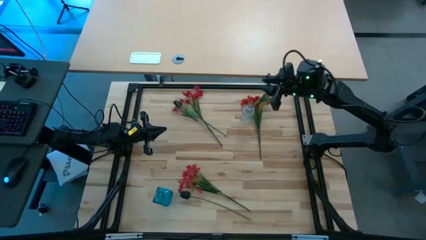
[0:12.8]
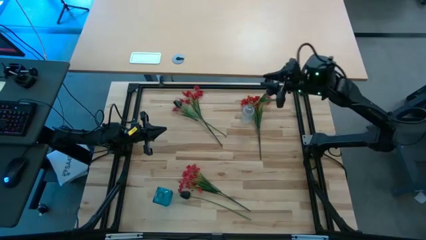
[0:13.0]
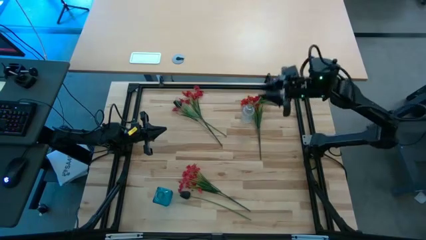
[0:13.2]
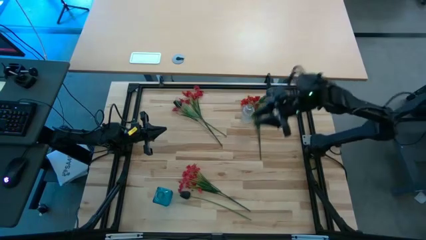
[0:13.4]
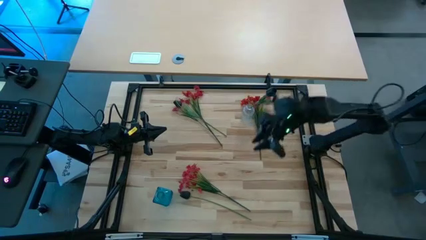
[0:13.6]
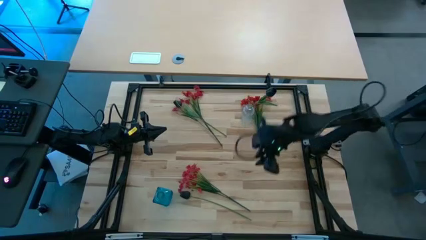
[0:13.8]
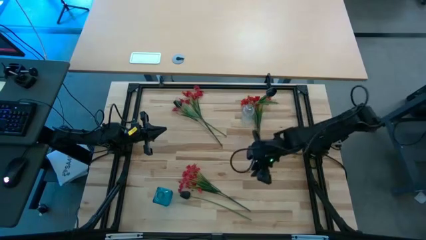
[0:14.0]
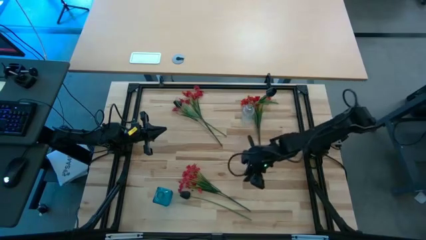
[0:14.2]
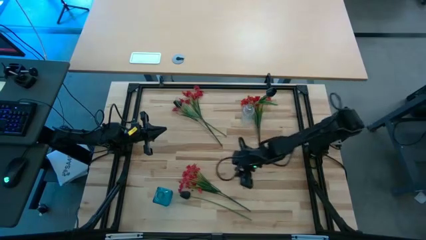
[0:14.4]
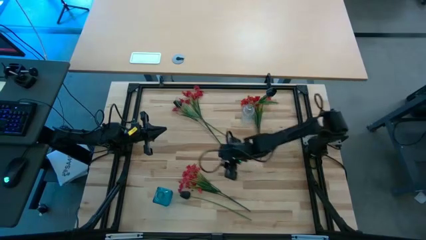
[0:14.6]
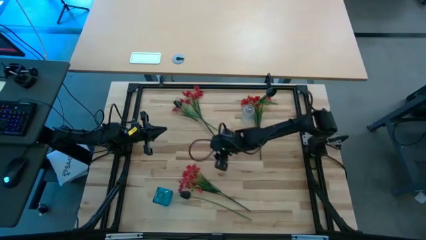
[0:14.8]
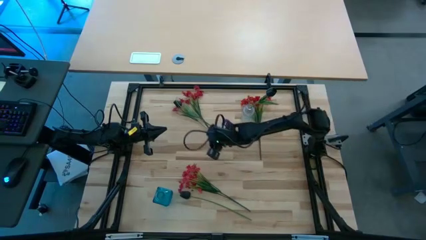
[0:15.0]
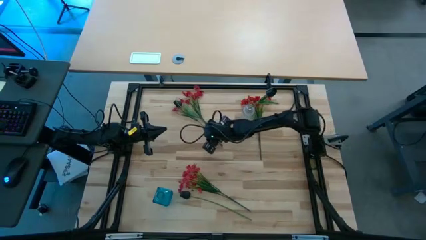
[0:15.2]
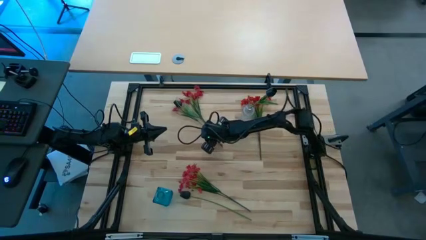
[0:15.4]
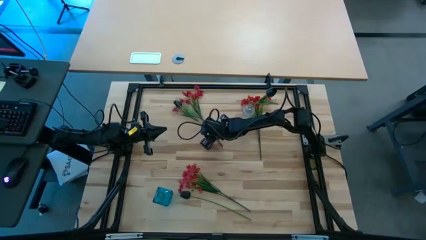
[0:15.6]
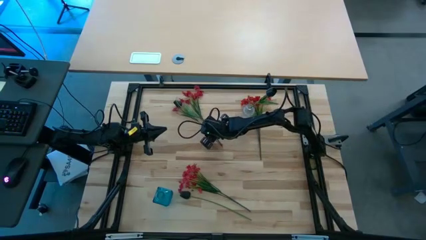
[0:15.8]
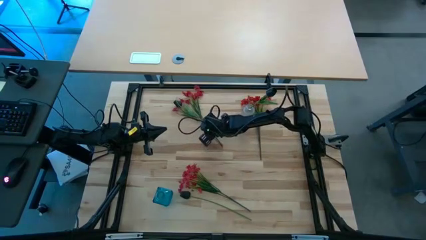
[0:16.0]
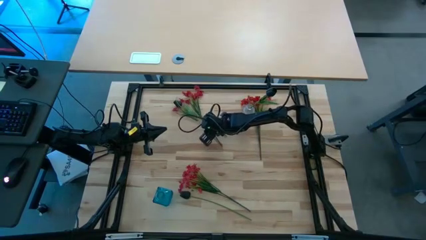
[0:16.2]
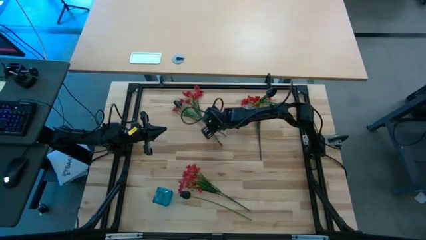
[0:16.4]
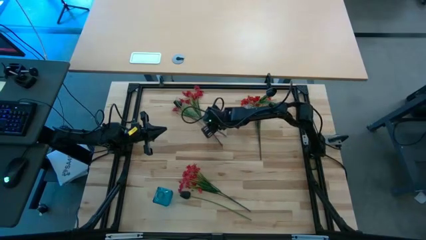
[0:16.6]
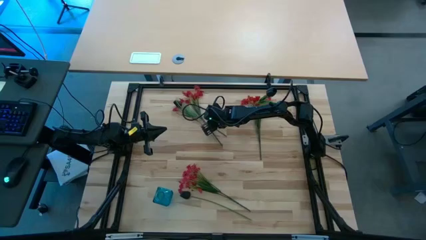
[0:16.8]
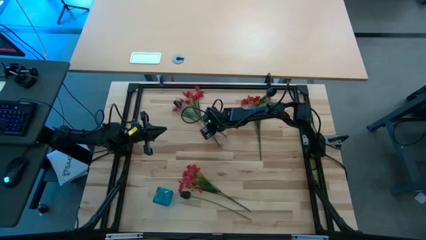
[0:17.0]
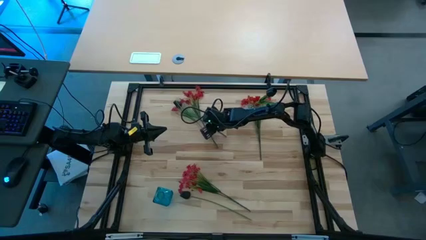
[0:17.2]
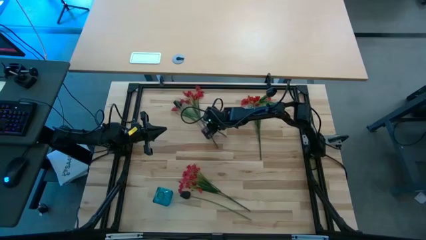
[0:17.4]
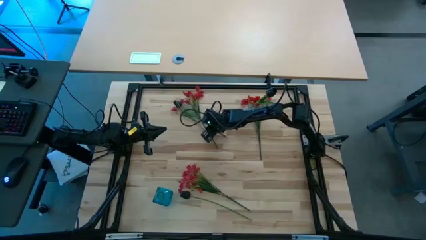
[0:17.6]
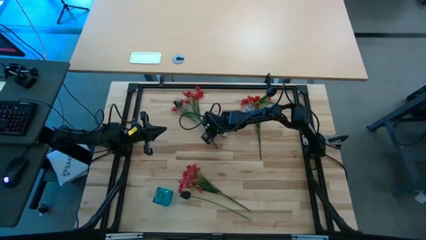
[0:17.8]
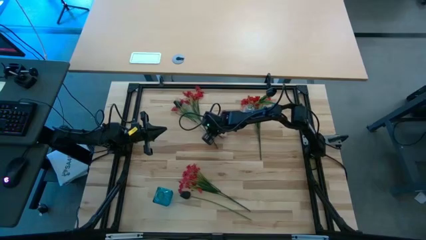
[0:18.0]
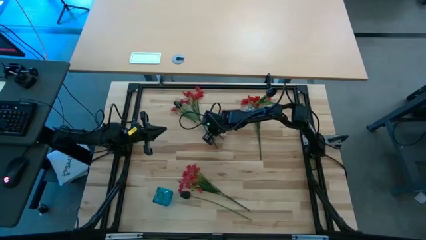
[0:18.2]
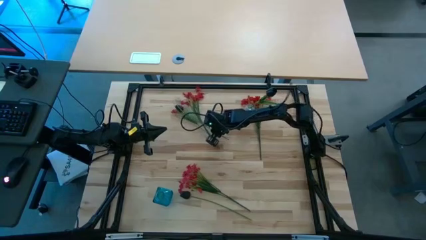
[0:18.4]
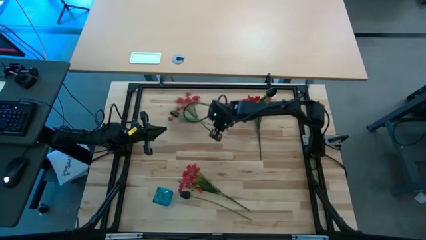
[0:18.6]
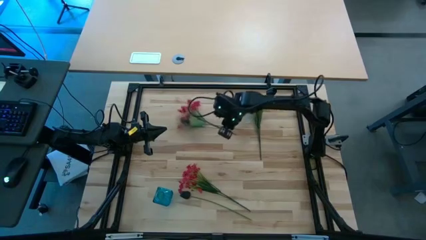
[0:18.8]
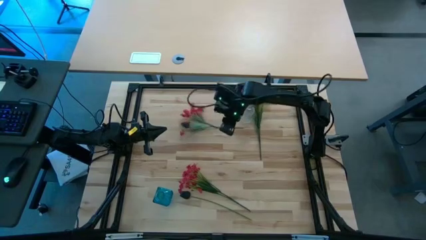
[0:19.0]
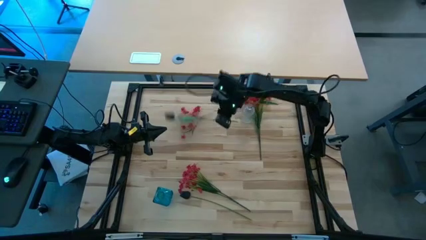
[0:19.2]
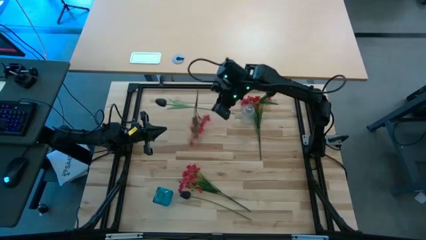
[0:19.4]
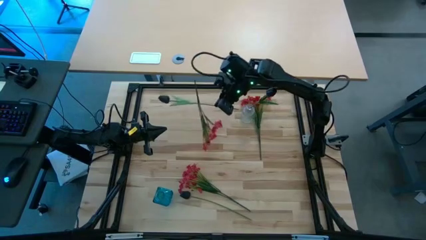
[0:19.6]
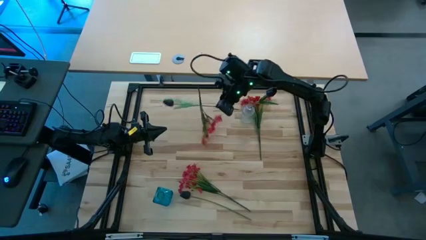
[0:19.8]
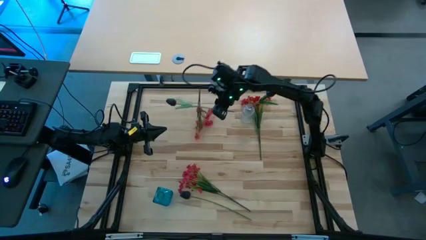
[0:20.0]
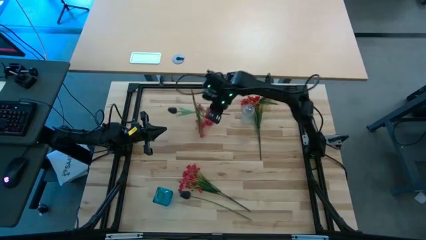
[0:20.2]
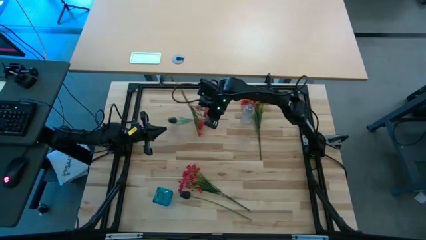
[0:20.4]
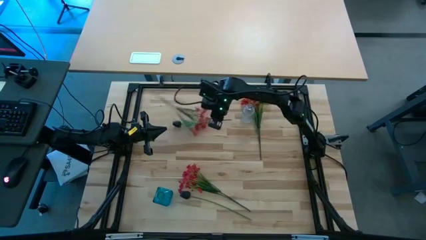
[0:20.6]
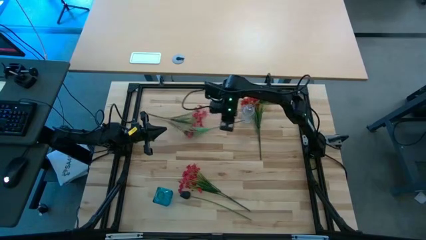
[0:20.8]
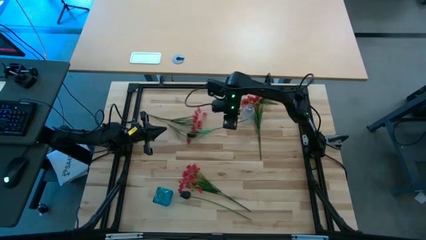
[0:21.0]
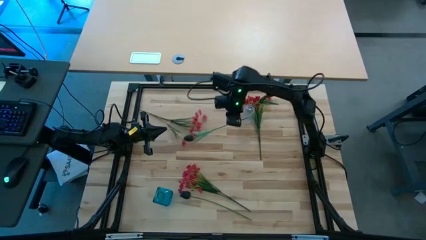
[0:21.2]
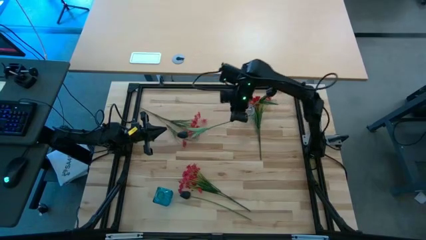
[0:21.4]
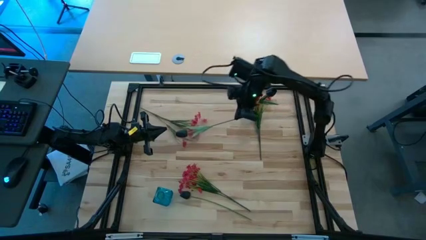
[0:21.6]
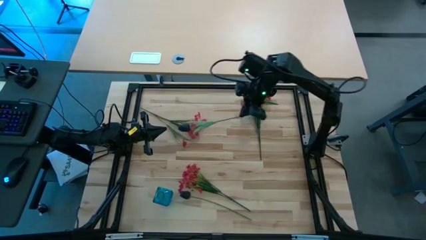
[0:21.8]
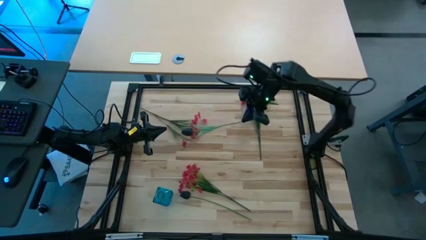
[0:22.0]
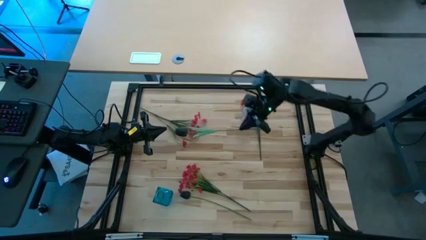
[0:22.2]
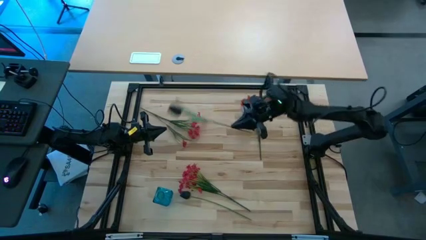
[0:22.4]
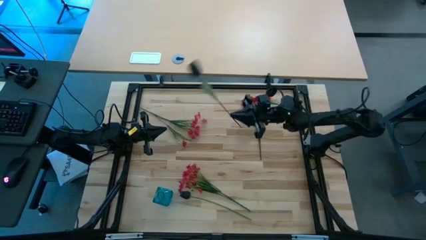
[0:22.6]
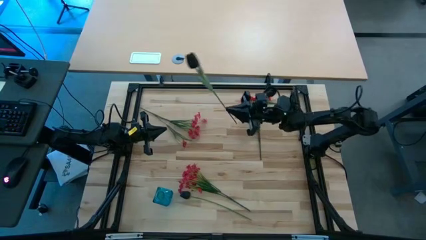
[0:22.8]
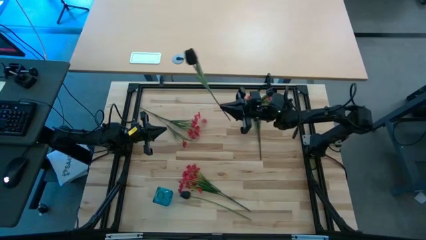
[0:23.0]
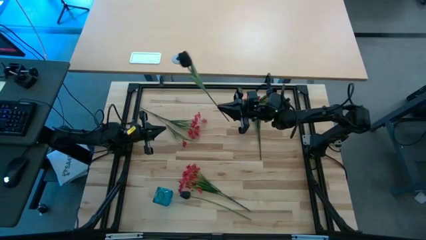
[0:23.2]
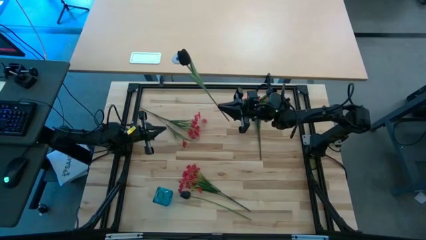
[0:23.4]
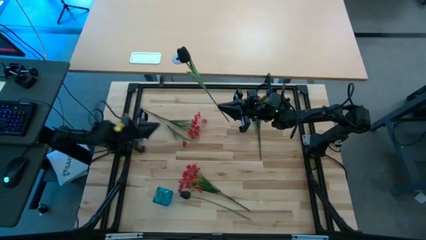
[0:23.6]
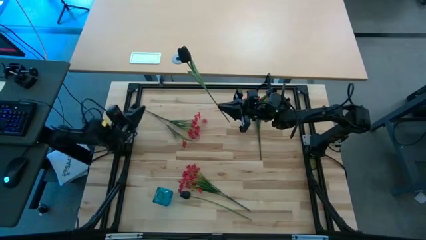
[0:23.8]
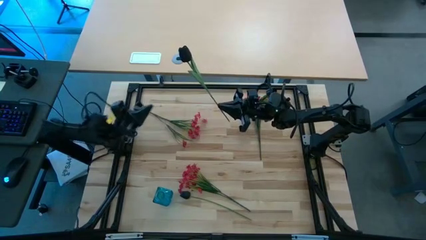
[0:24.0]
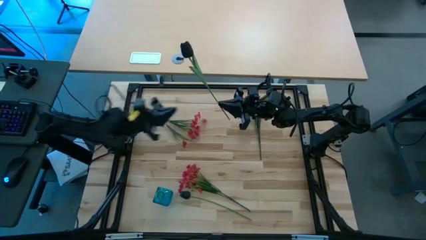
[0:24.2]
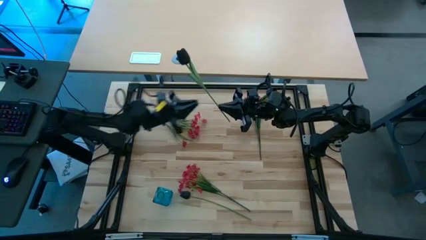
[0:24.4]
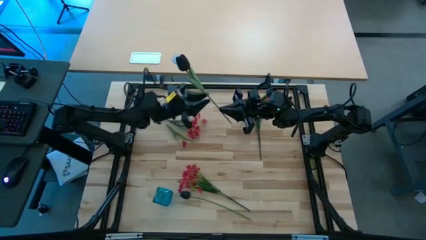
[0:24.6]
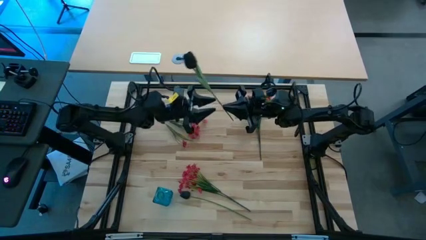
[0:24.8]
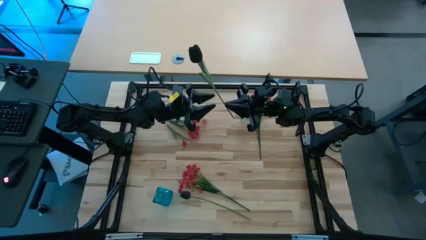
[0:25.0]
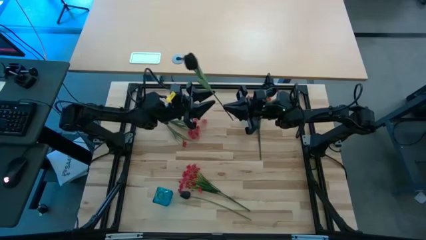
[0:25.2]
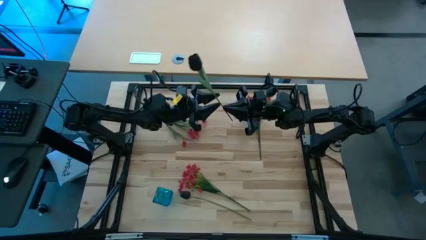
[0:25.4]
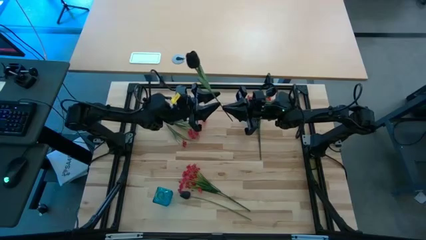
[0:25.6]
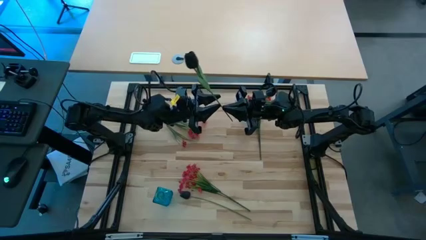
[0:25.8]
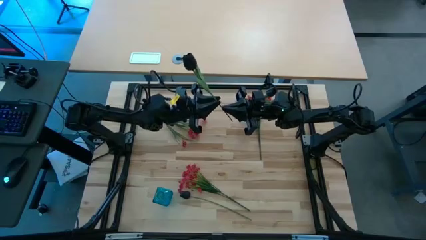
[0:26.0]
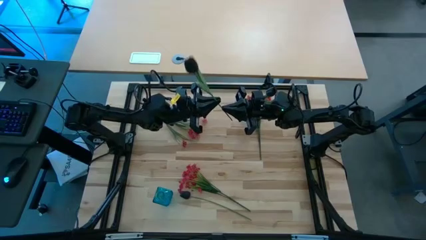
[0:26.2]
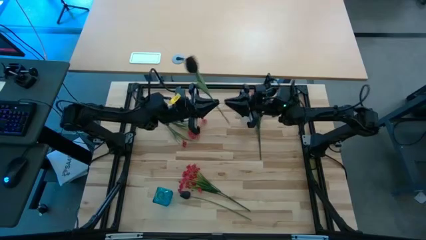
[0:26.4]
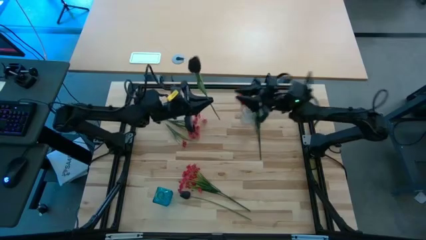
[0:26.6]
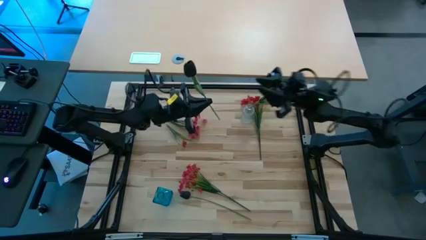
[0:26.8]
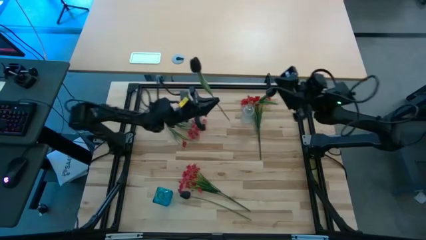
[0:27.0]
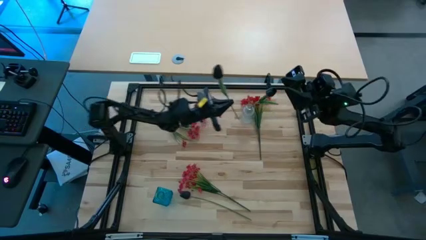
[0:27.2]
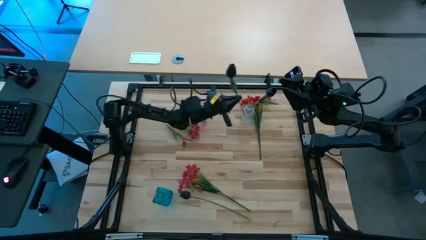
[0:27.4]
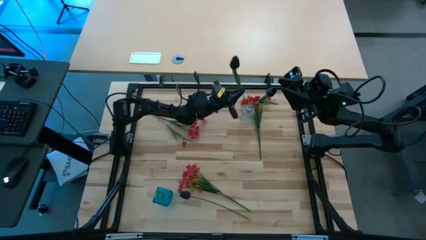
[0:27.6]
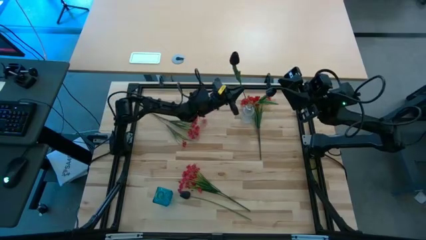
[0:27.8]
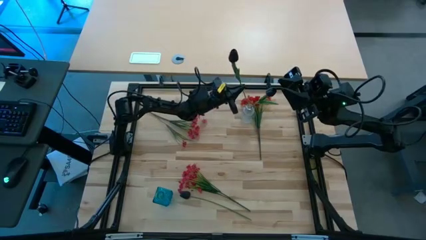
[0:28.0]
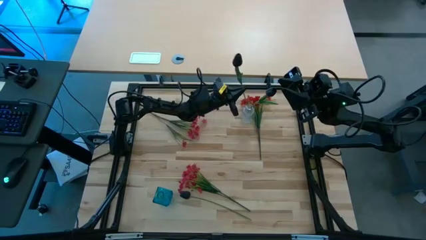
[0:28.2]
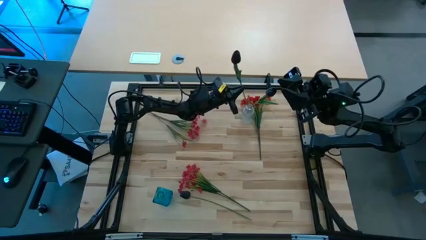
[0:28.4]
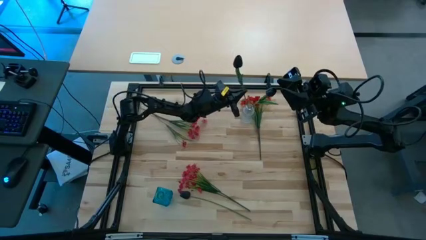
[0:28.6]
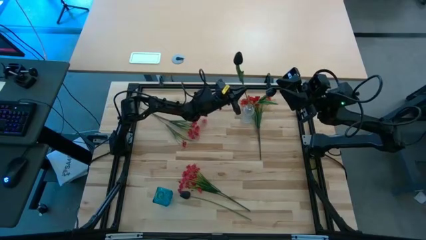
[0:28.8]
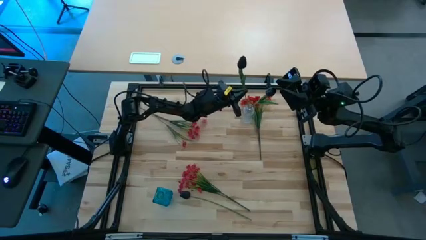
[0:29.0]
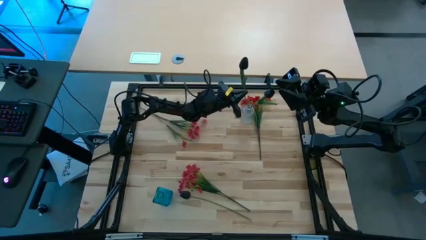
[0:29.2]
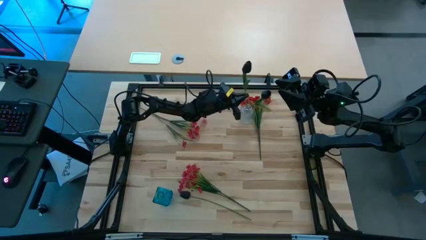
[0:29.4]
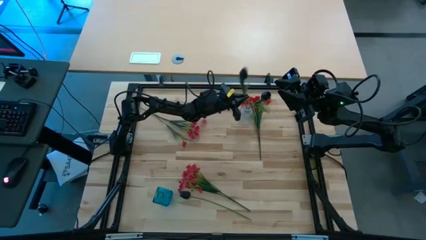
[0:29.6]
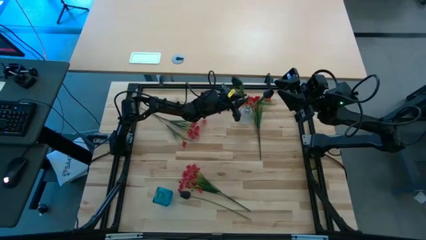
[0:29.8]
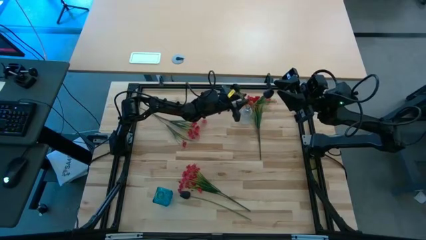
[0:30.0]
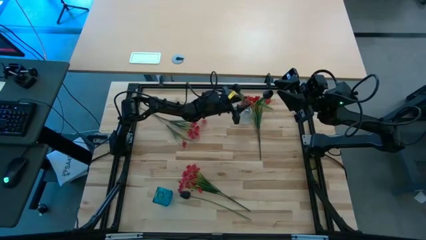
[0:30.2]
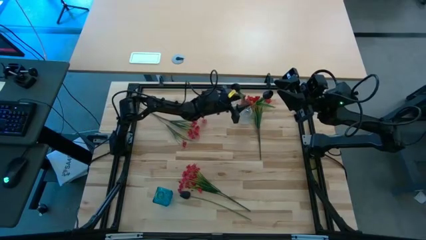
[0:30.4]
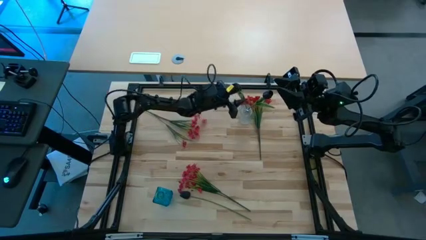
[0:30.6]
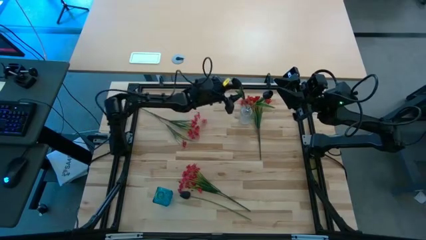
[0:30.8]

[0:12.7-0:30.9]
Task: Sort flowers into vase by color
Put the top black tulip into the transparent vase
